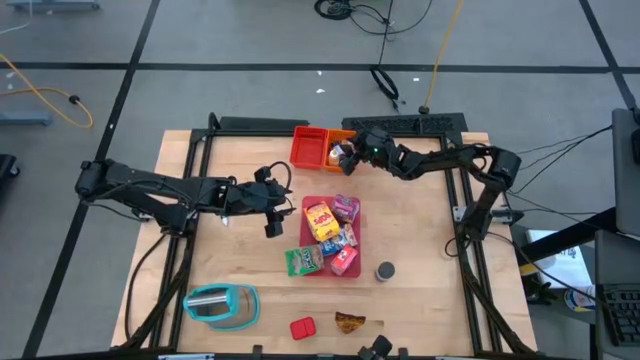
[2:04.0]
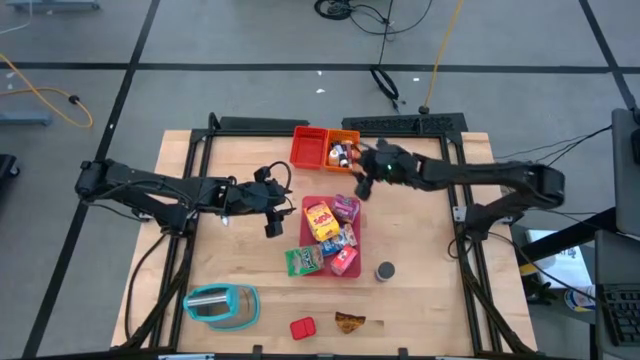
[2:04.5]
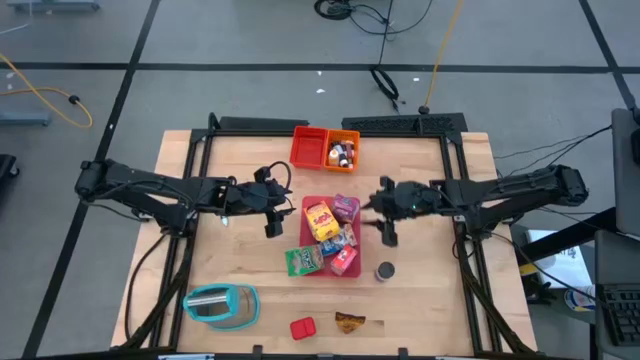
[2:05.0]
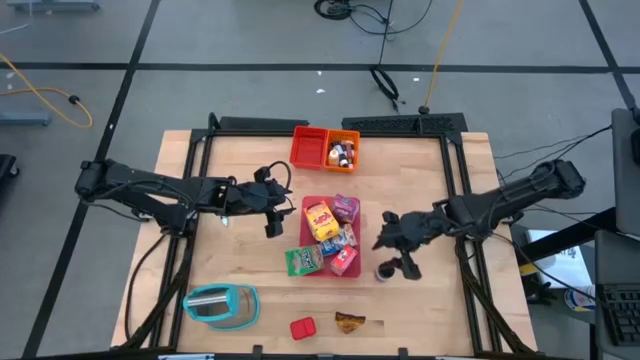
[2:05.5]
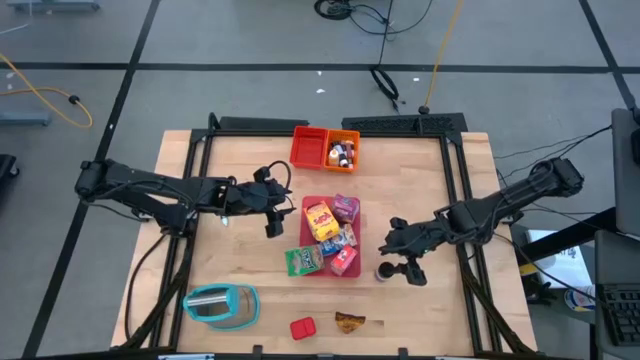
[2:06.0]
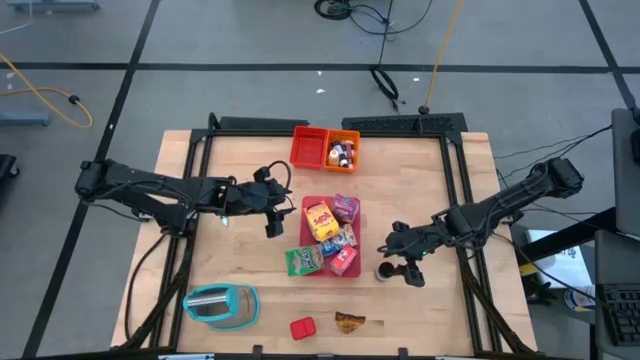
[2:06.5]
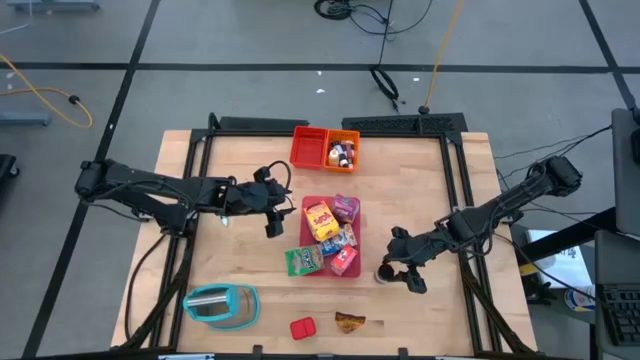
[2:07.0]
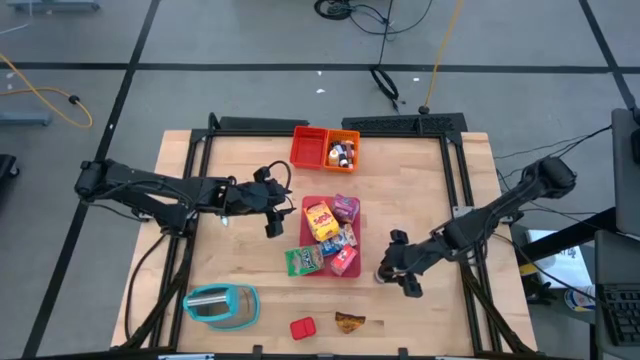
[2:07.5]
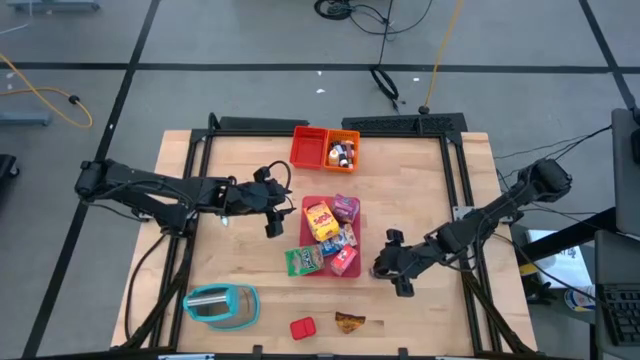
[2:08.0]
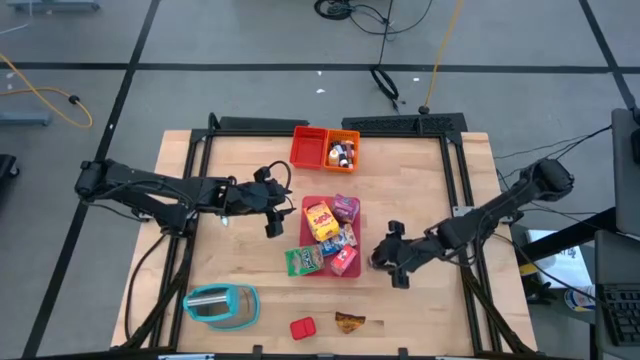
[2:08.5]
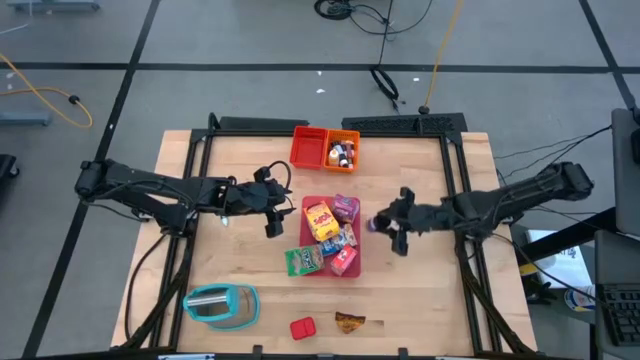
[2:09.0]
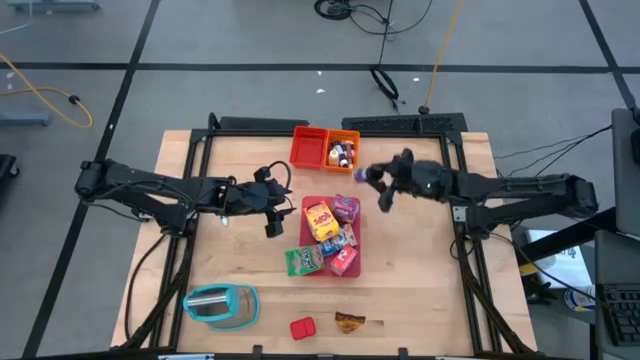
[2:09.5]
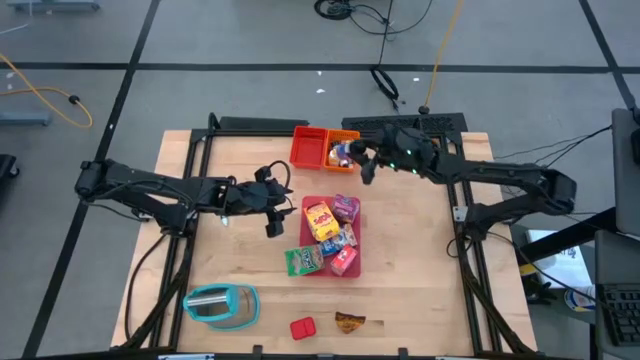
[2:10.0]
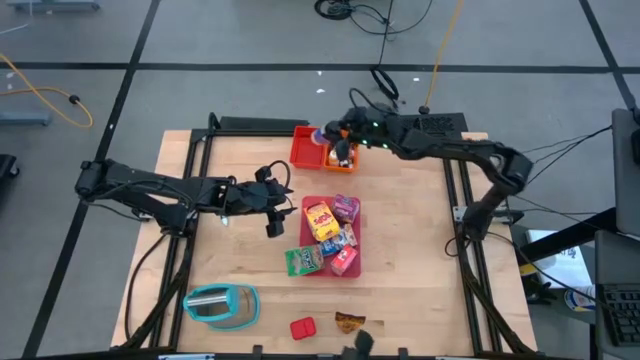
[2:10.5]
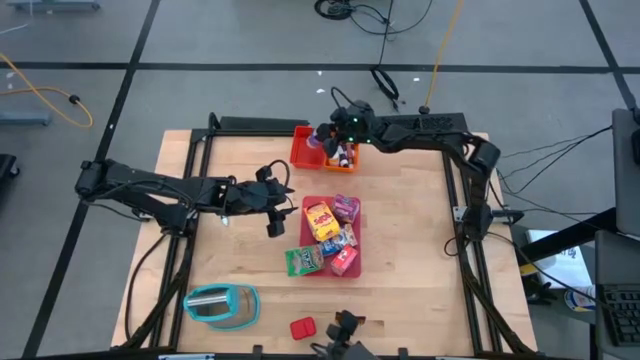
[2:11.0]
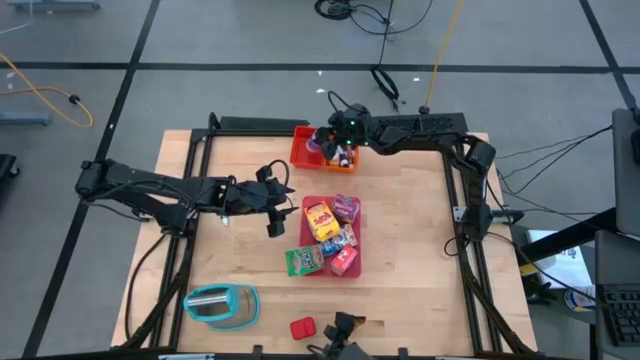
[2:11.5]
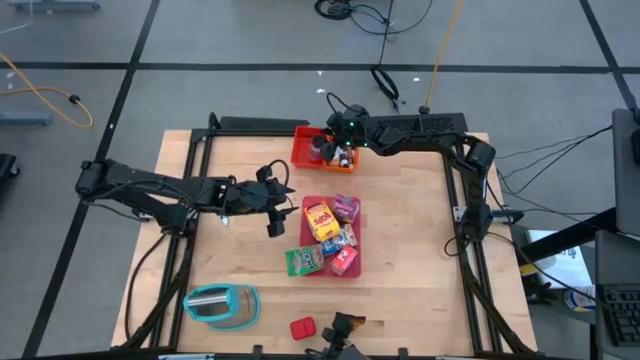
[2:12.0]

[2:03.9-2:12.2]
Task: Pick & Place Kitchen Items
Put the black seasoning bottle into the red basket

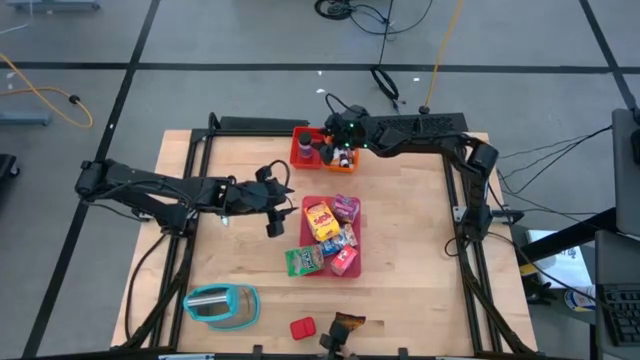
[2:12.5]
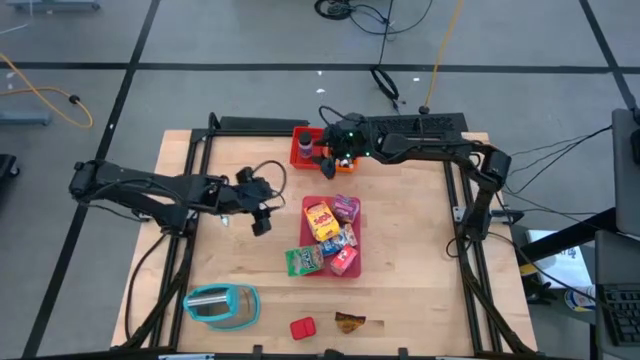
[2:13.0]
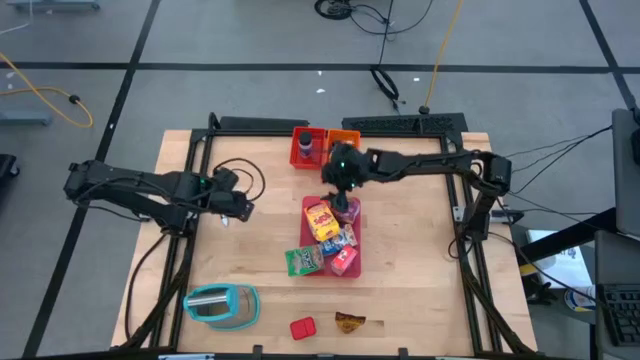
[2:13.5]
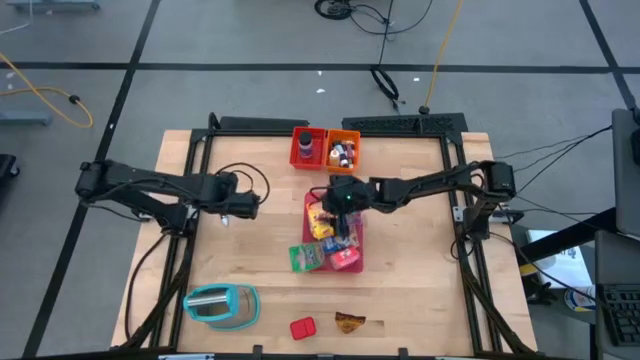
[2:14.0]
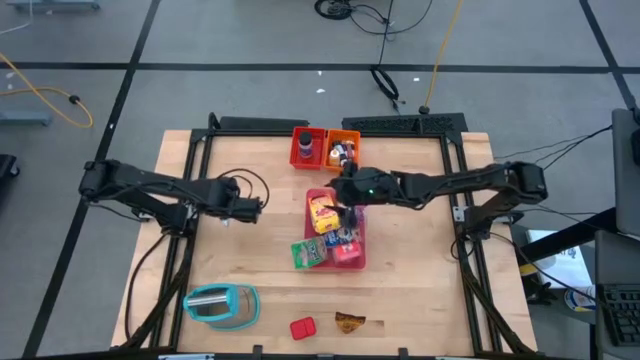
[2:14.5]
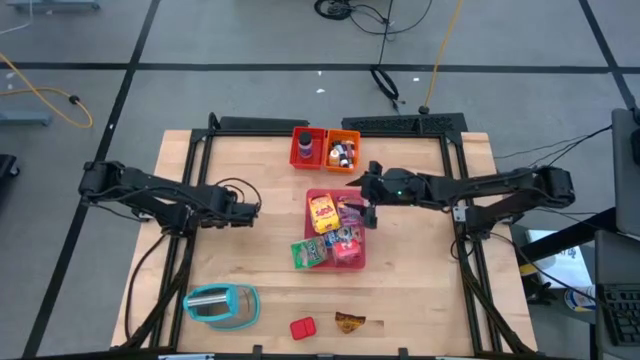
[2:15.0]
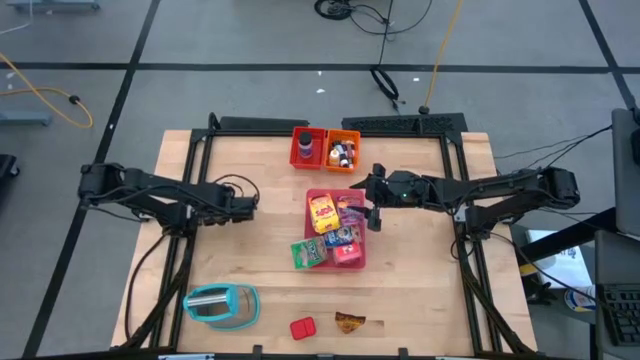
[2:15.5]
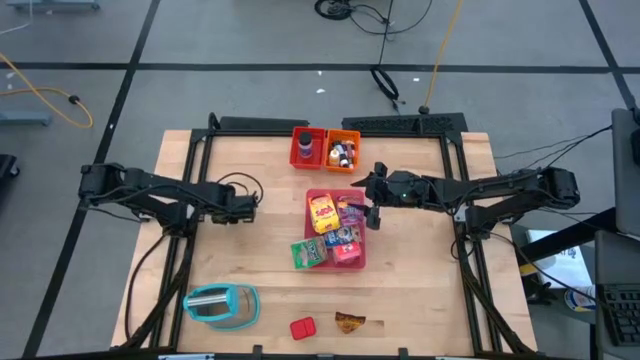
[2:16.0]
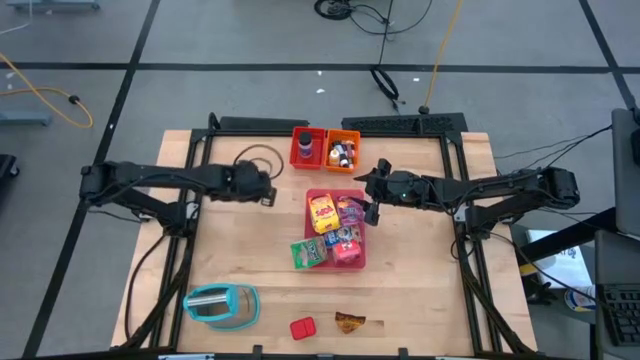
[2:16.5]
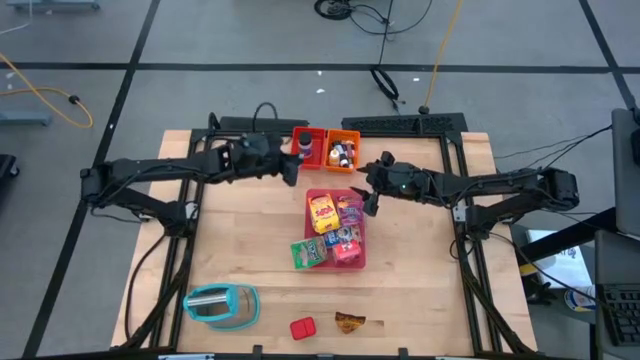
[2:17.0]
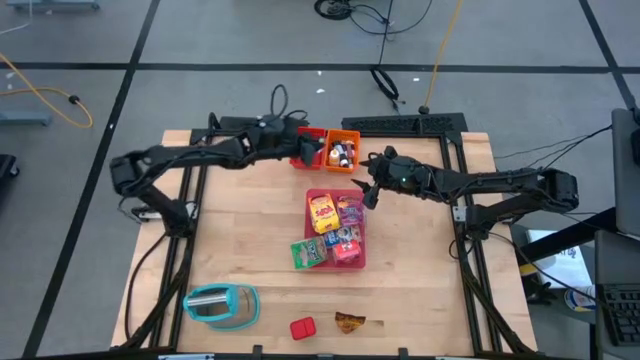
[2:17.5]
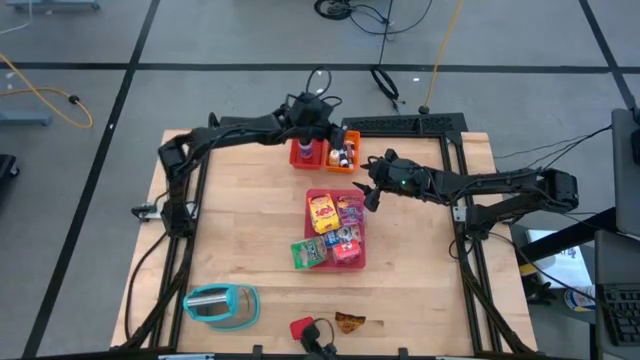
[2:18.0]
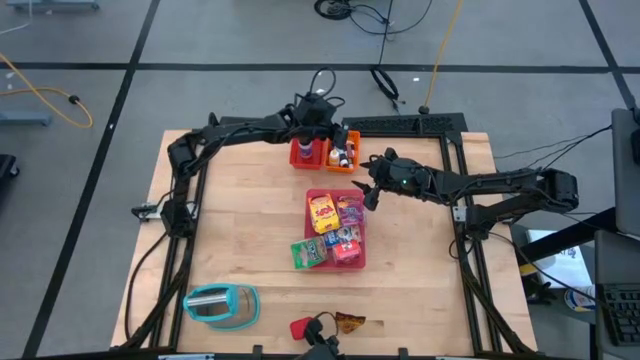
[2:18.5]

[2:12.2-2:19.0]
Put the small black food coloring bottle into the orange basket

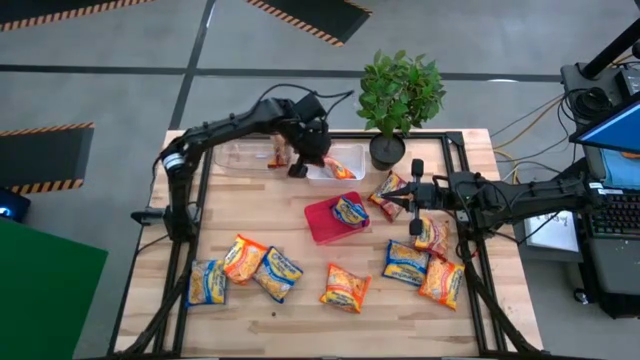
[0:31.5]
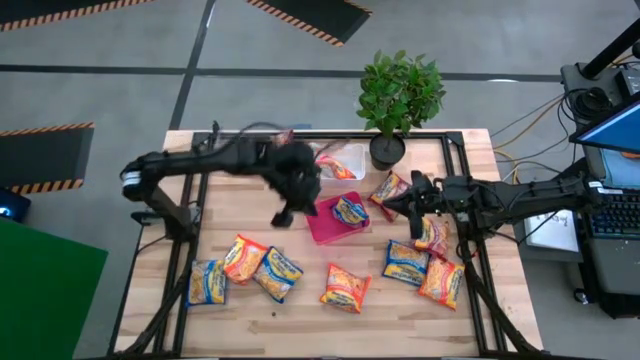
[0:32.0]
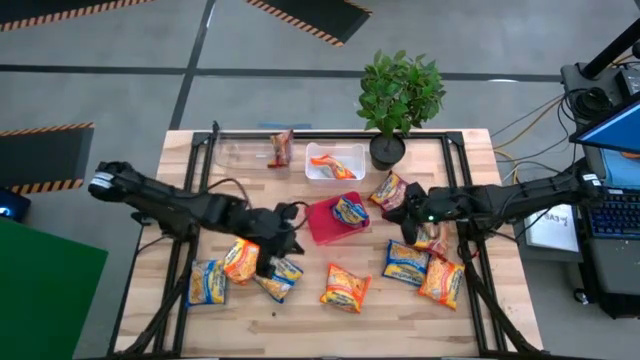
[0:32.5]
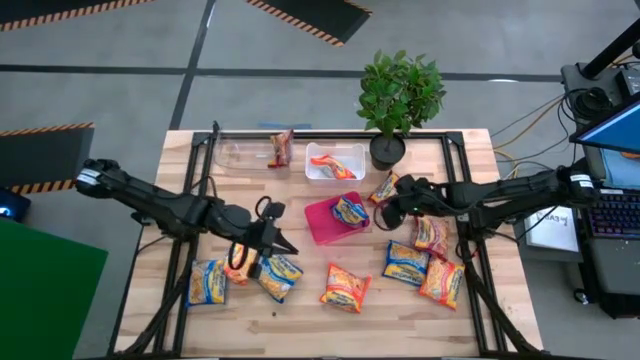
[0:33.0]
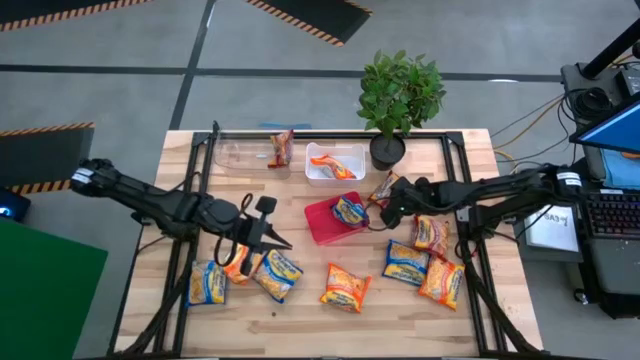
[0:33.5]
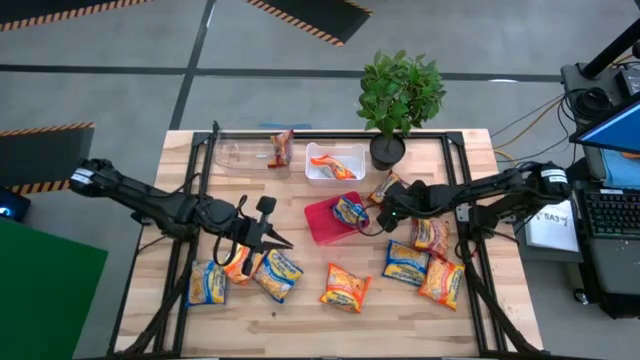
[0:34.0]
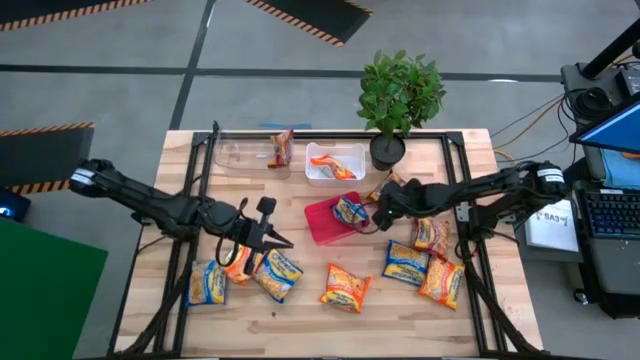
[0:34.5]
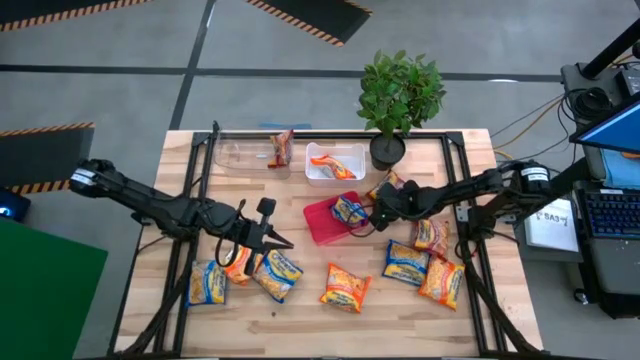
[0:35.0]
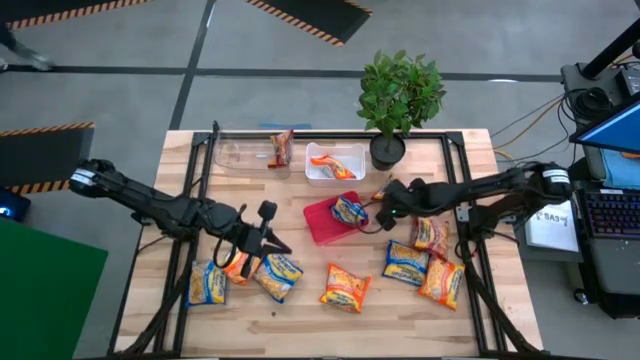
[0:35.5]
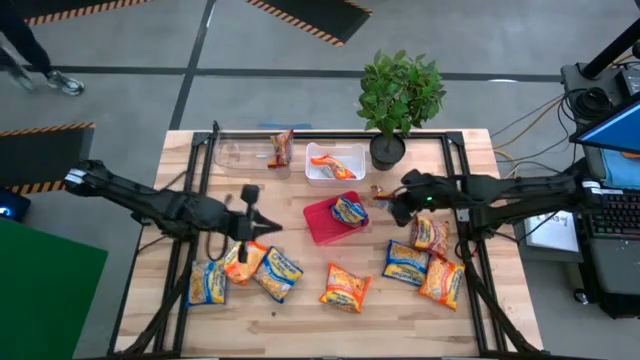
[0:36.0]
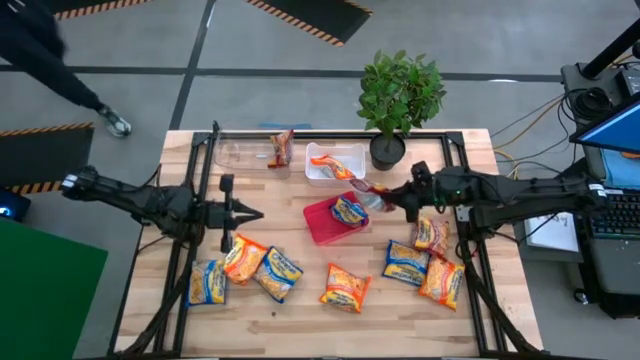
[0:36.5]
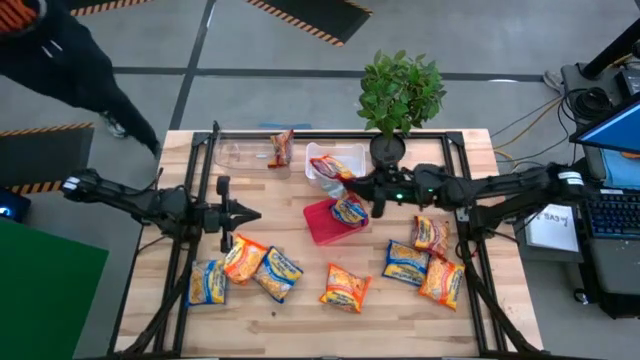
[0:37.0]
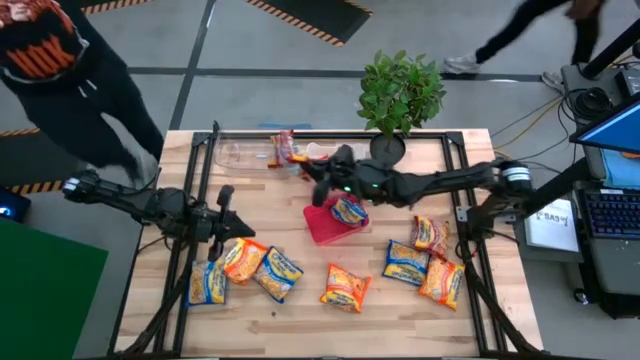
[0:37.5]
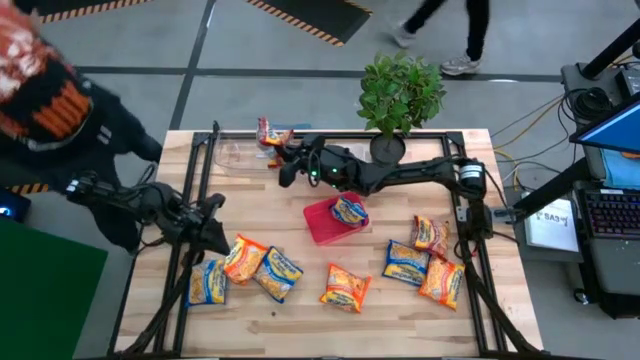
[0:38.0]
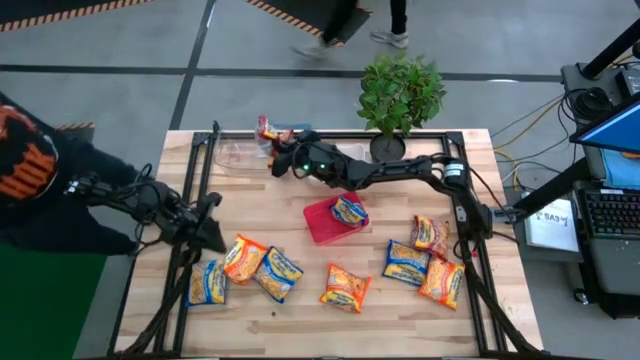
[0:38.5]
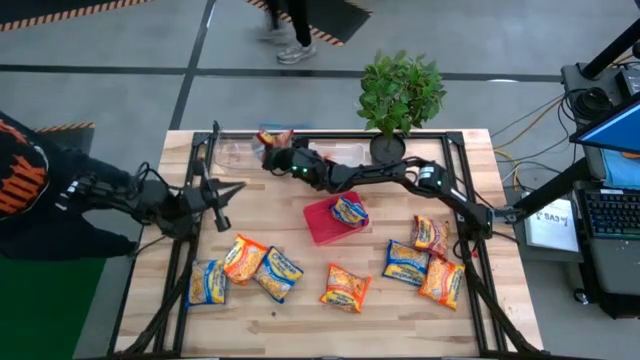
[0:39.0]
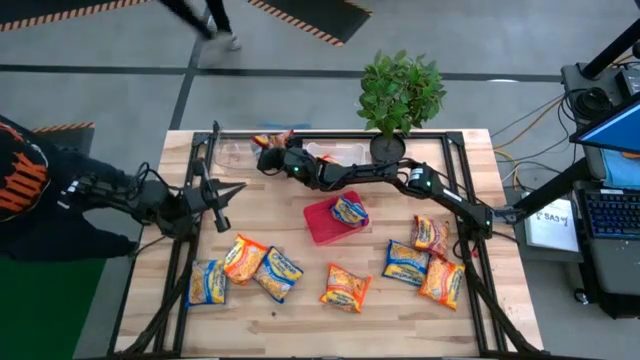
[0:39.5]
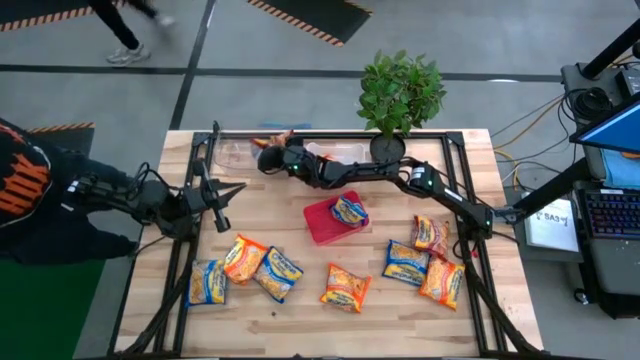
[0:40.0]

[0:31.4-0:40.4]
Task: Sort Maruchan noodles
Put the red noodle pack into the transparent bin
